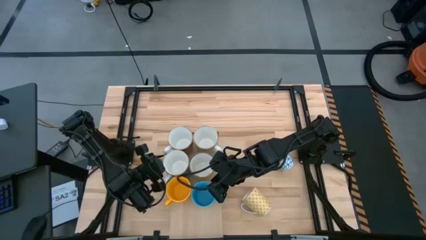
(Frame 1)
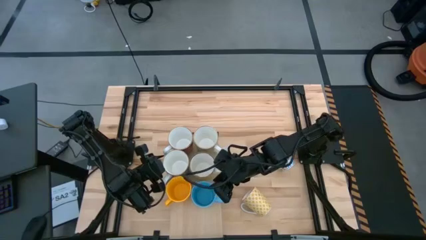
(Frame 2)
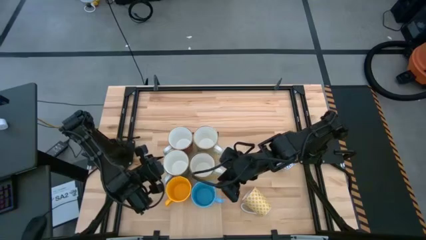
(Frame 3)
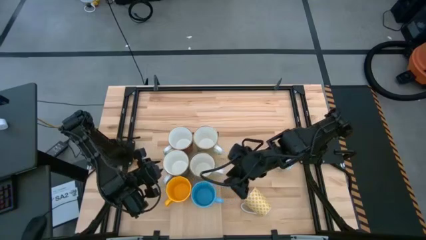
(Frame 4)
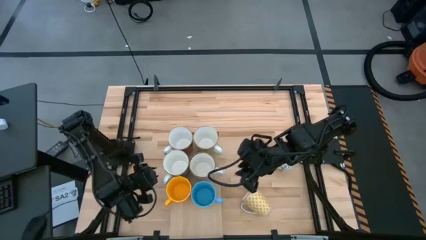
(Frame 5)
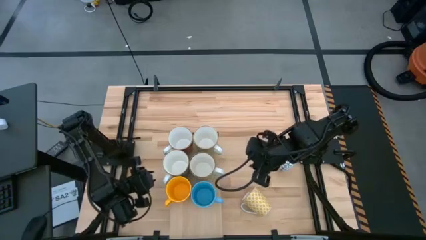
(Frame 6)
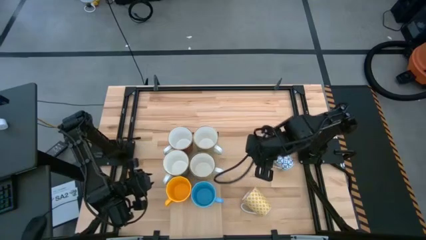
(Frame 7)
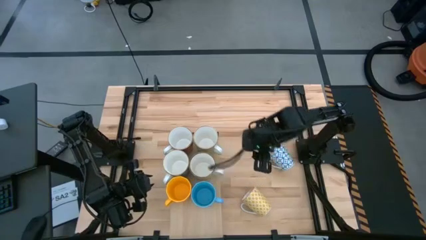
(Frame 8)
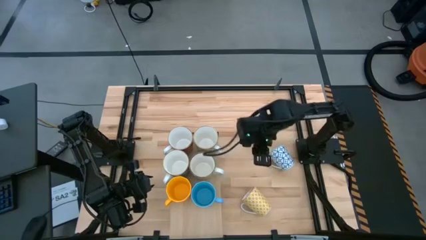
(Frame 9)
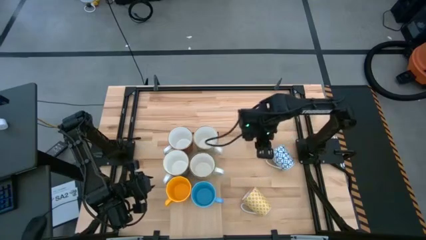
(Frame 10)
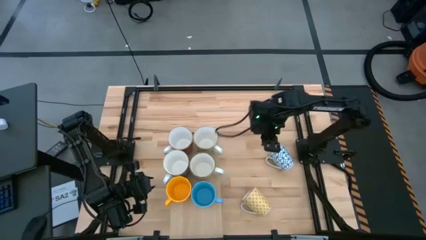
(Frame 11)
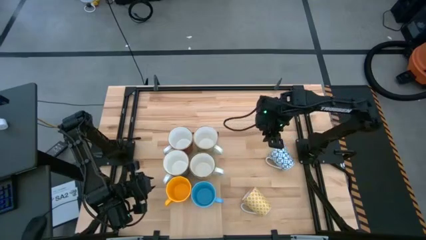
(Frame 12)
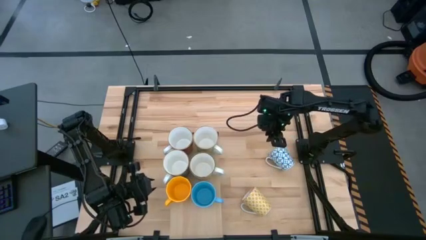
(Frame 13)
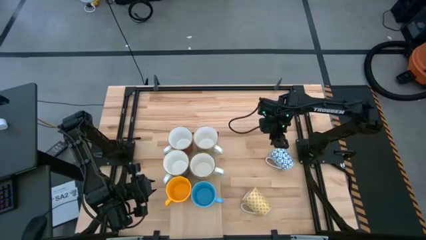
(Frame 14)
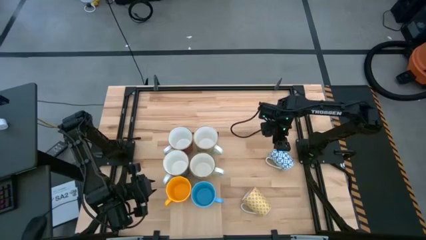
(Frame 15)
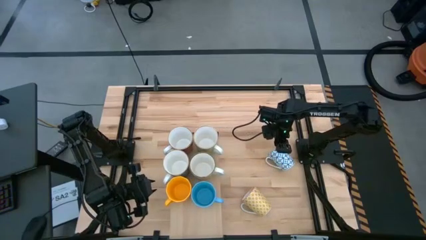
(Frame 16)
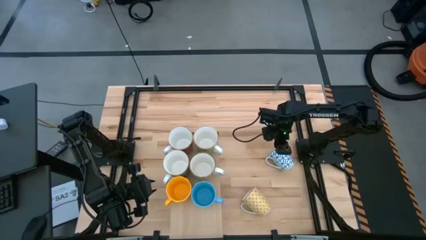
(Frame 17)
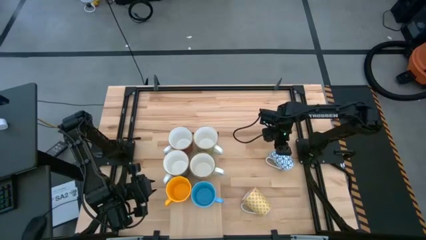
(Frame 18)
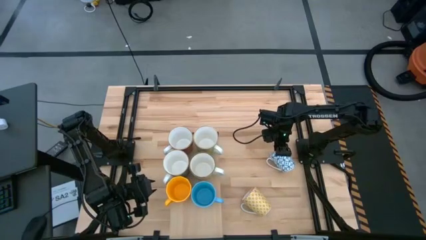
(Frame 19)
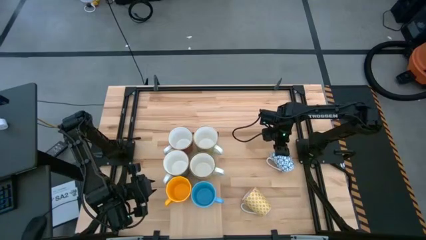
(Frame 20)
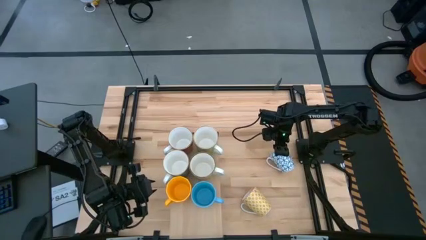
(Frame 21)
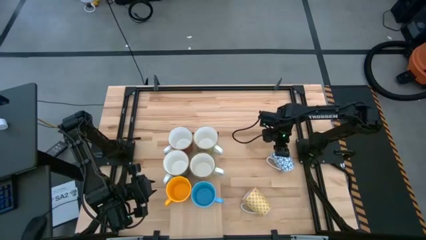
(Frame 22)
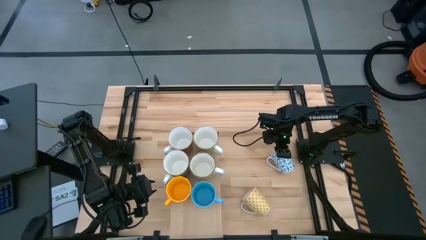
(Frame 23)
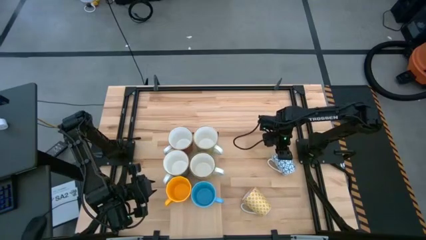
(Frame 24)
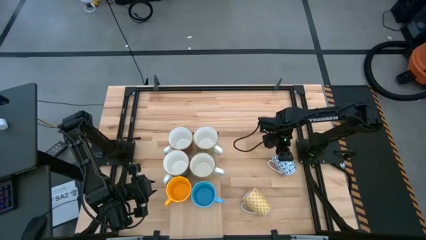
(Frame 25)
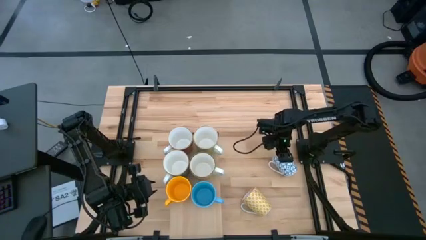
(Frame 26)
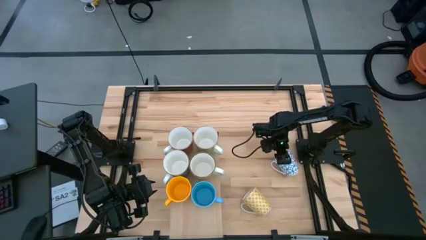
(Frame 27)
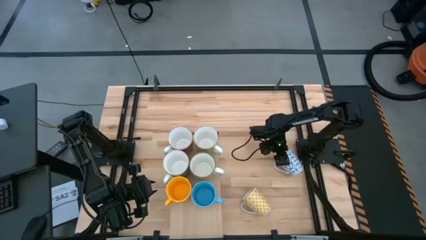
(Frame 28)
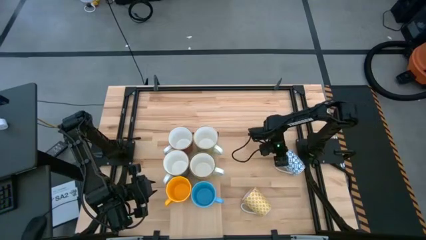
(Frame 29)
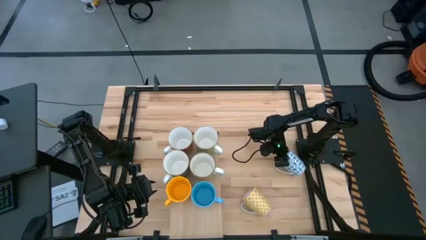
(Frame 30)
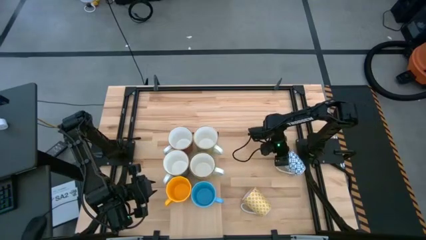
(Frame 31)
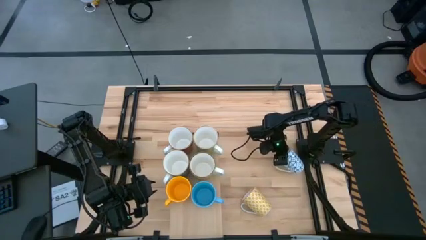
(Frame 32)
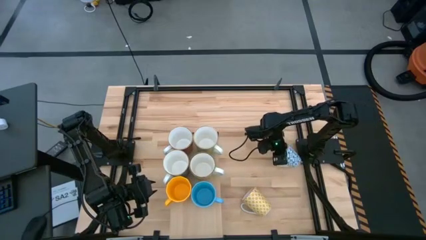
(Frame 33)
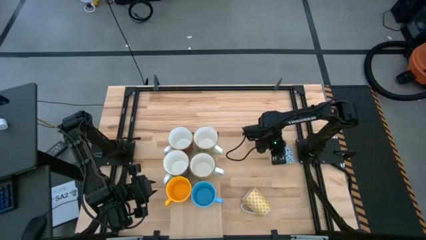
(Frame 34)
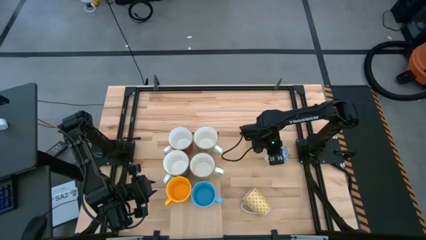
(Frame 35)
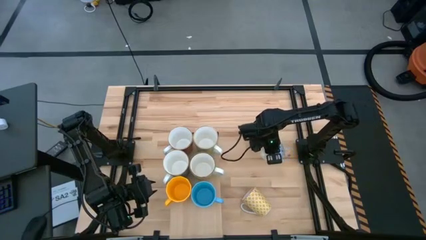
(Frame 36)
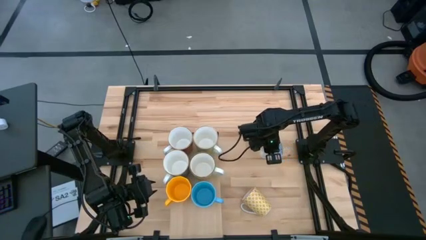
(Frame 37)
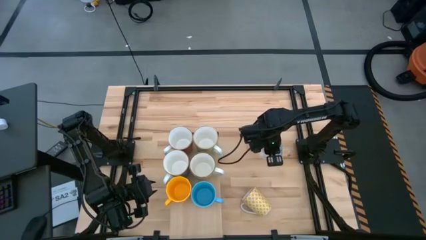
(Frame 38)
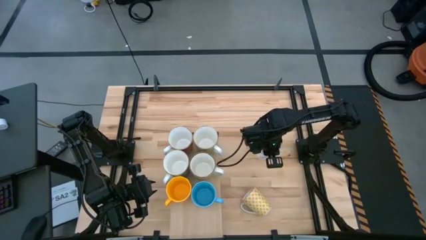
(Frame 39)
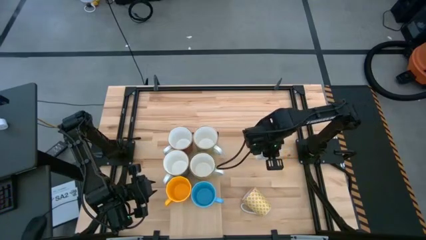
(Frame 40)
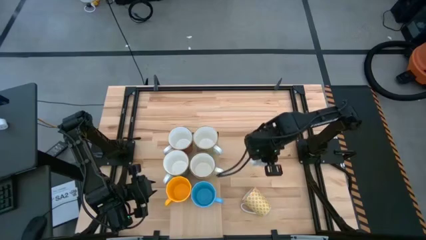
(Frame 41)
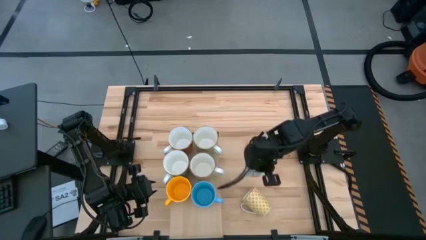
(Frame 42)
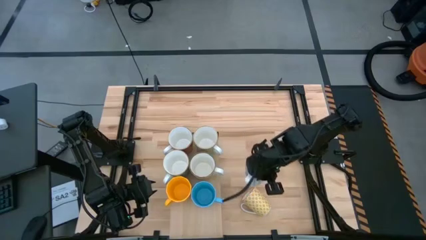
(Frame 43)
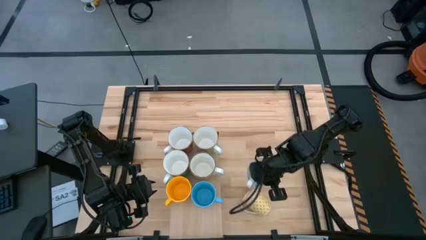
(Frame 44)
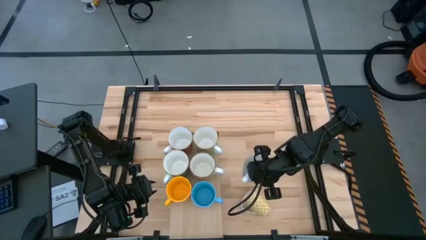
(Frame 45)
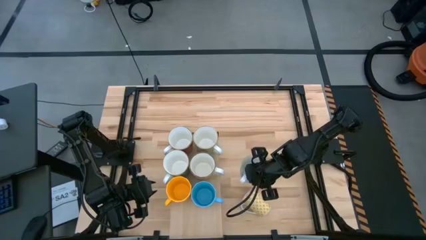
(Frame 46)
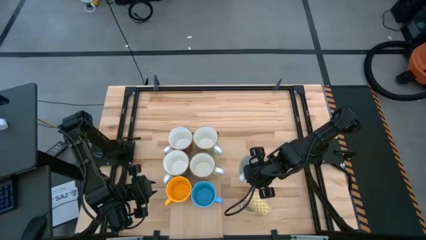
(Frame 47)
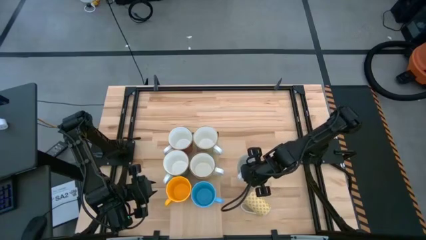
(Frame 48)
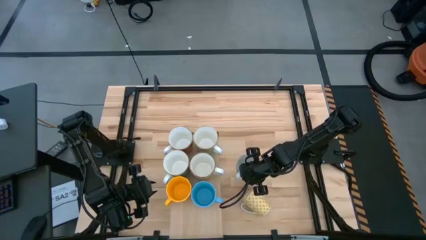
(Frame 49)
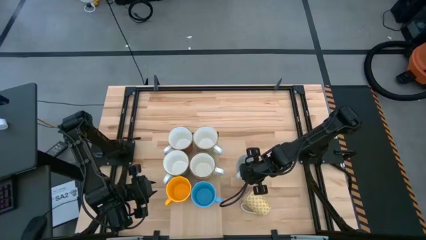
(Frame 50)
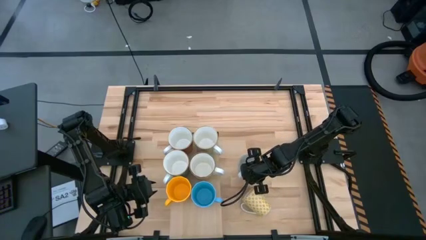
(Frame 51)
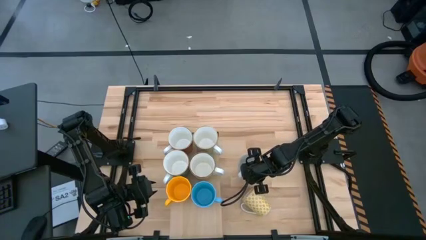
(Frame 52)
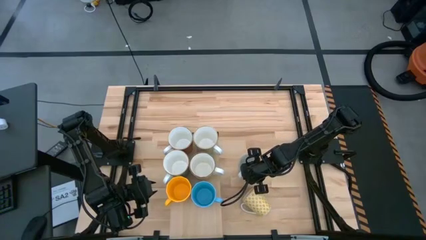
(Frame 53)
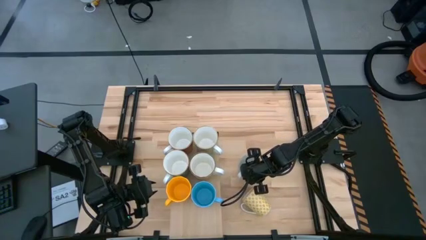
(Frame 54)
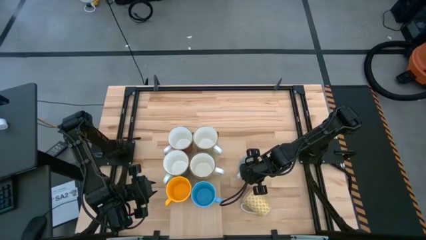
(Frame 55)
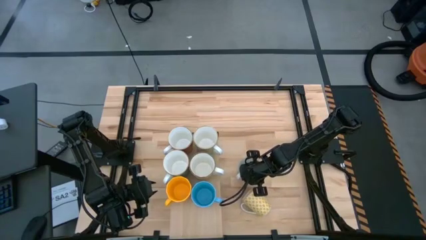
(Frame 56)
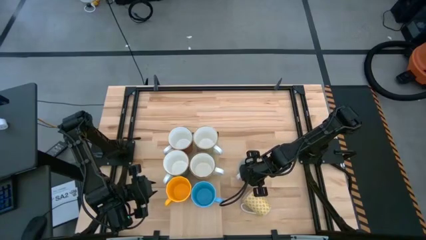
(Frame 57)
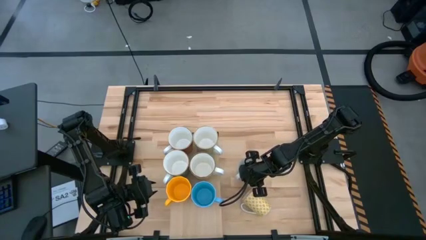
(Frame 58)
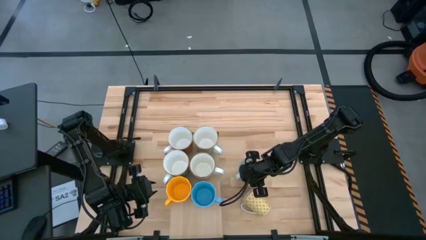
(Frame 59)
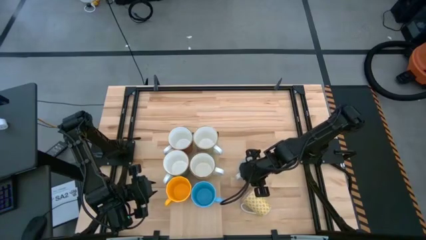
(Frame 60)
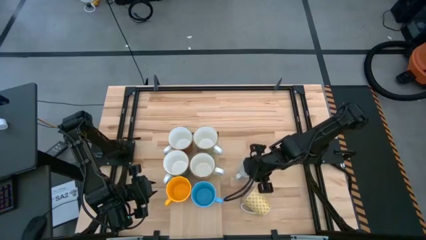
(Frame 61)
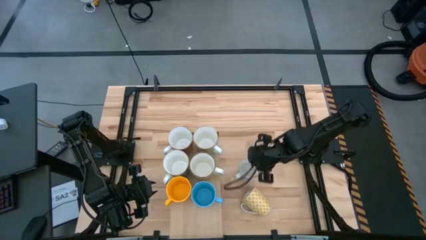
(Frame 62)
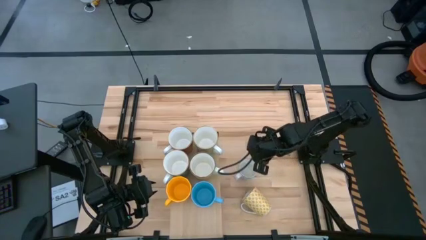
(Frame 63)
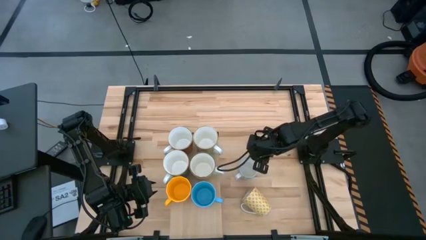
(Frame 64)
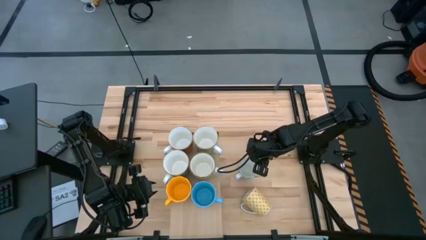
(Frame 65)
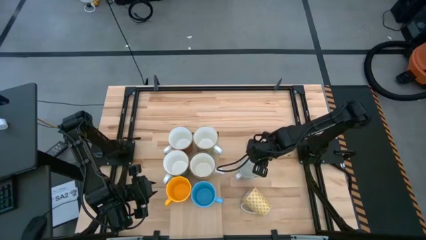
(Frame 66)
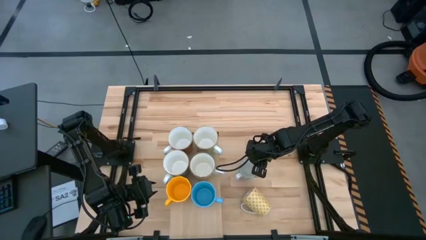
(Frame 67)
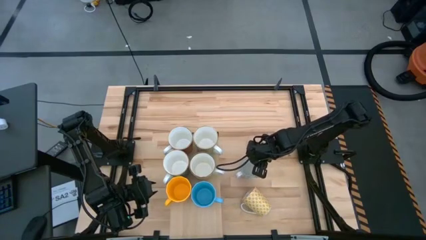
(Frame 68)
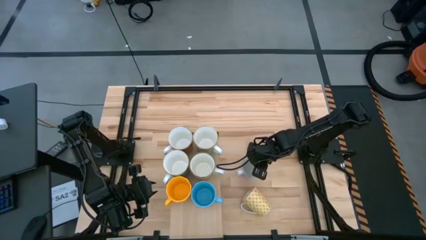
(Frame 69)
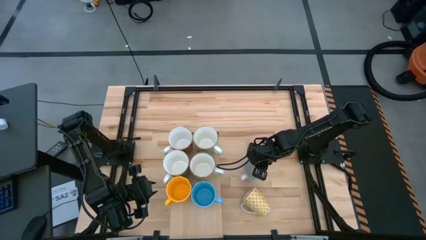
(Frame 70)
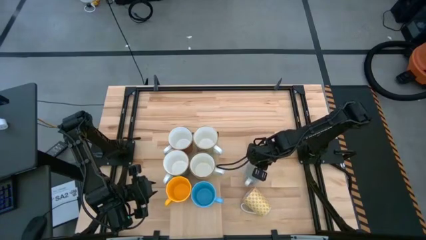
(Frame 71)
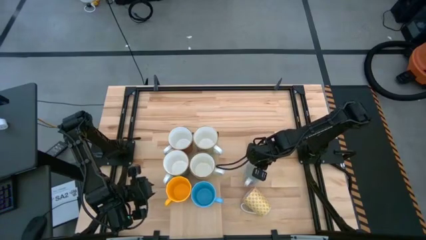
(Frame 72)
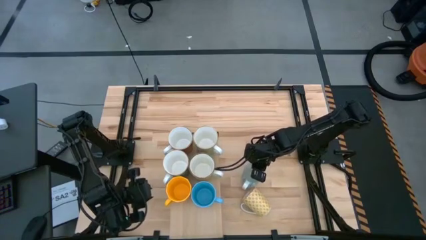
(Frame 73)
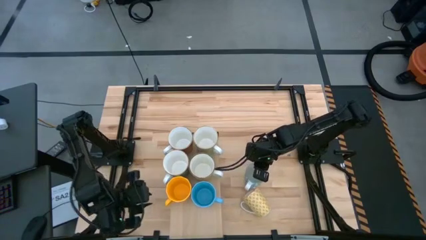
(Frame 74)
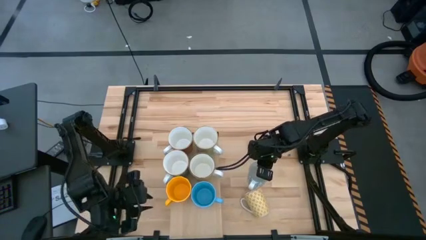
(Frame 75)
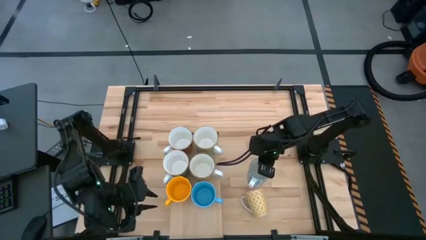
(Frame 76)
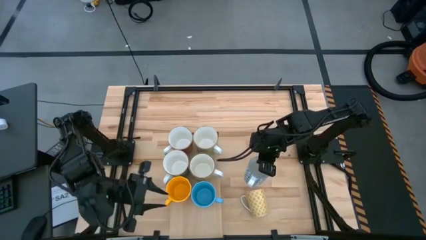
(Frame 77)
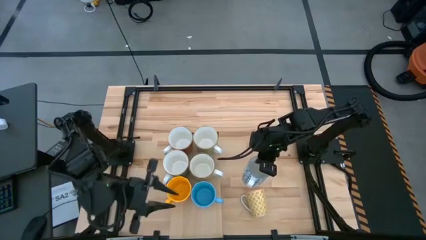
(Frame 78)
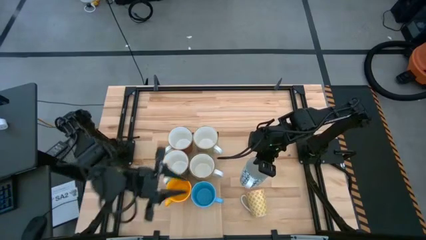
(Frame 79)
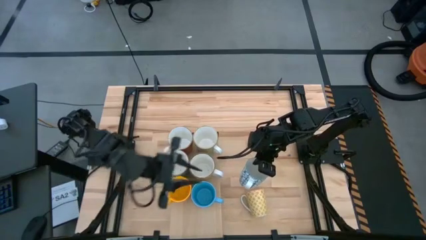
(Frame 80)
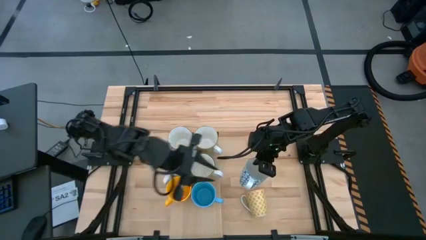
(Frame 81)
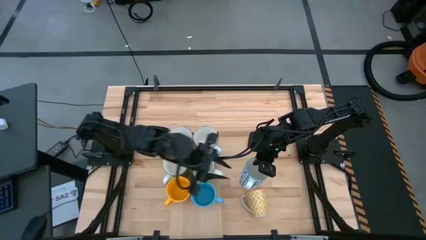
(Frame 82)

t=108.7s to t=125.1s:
Task: Place coffee mugs
Put the blue mug on the shelf aligned with the yellow mug

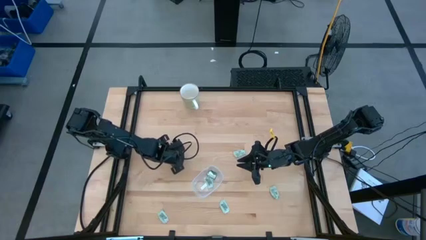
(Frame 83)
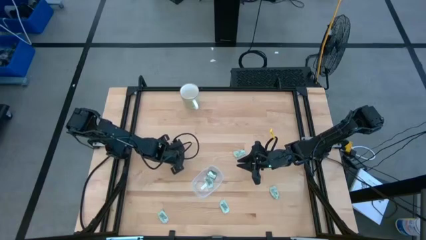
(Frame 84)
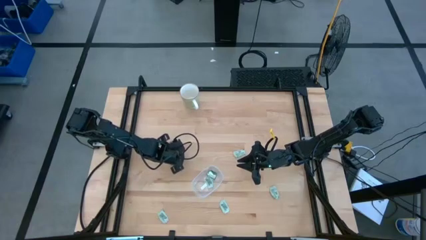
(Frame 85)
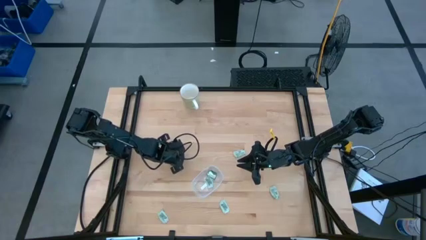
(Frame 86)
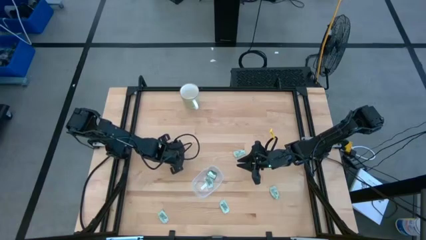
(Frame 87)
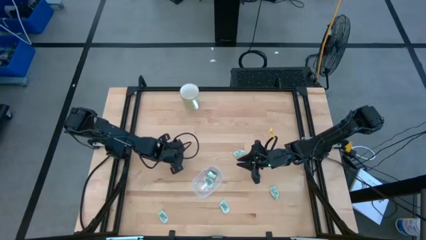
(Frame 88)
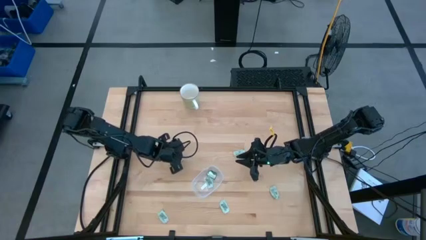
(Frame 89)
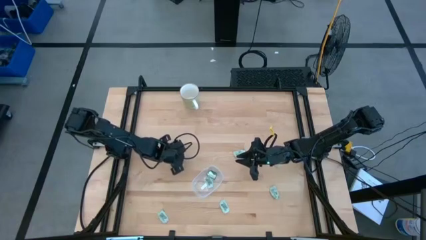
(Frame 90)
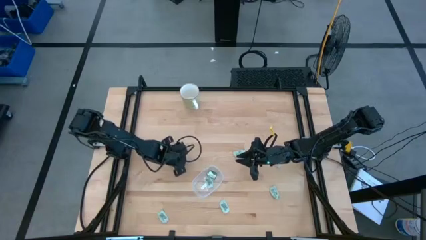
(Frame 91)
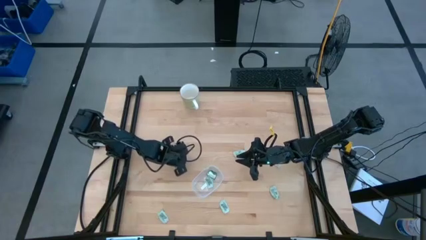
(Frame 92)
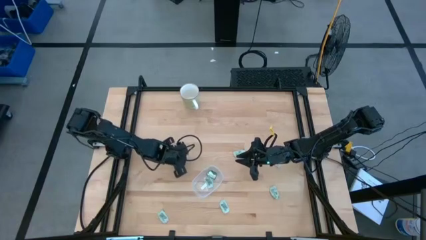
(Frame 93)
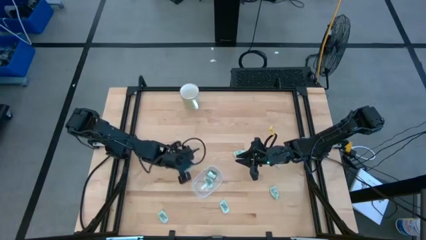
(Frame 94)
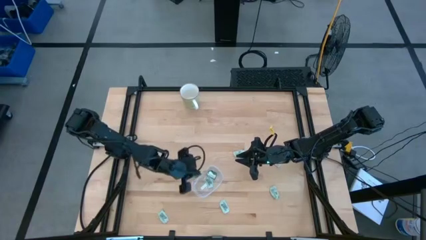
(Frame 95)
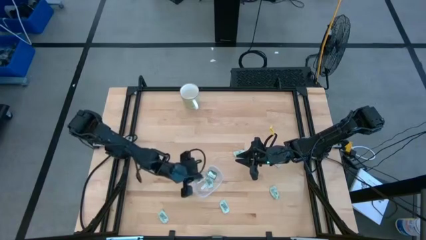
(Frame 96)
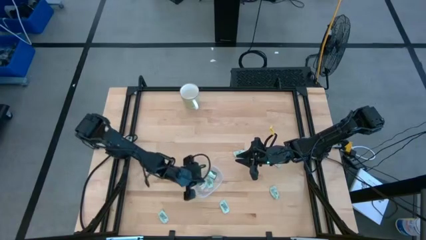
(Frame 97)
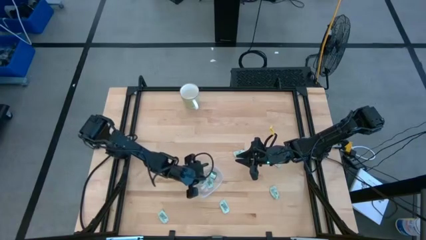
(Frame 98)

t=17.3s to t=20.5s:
Task: Pick and place Stevia / Truvia into bins
Put the light green stevia packet into the transparent bin
